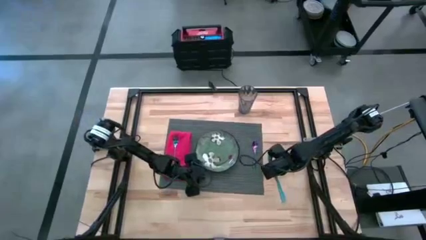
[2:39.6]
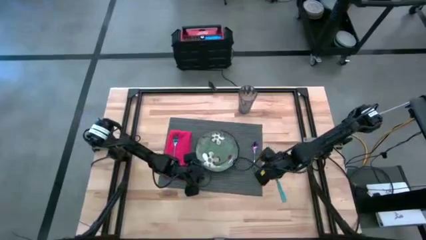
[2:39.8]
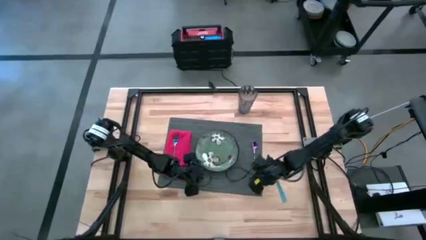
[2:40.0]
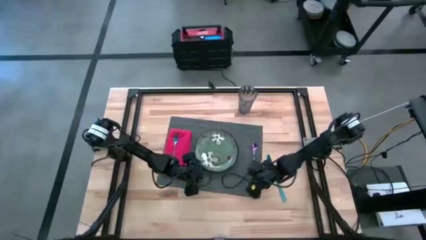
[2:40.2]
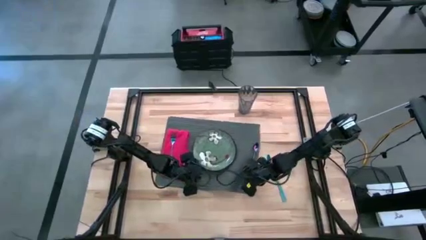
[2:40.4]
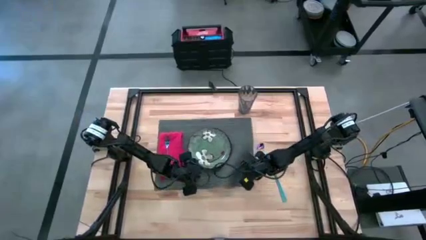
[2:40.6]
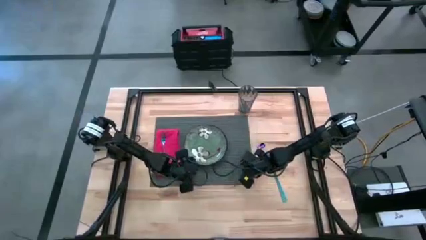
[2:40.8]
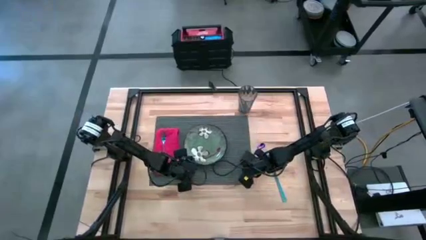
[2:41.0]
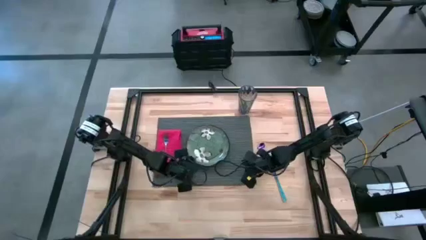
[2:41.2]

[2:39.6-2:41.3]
Task: Set table place
Adjust the gray table mat

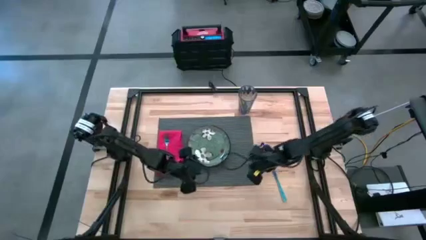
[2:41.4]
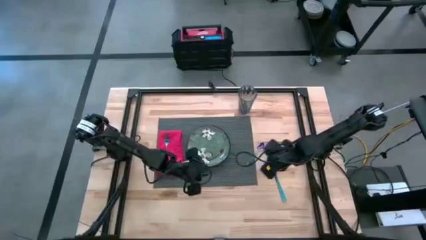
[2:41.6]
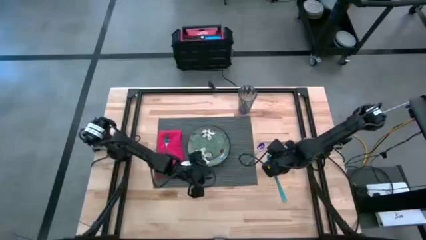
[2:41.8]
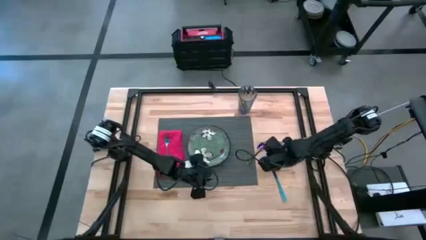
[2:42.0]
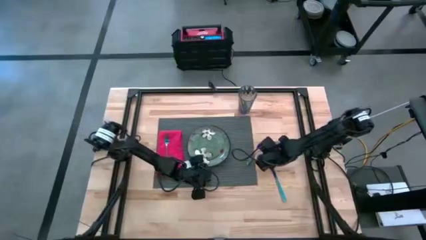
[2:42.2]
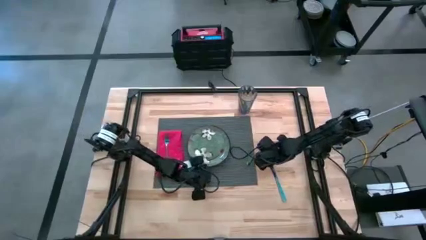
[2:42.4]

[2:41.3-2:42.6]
Adjust the blue spoon on the gray table mat

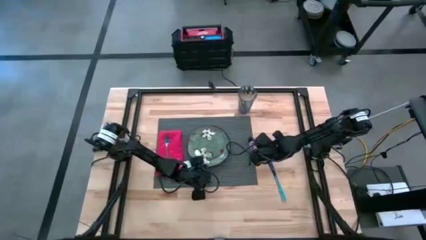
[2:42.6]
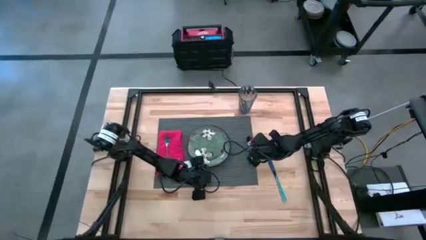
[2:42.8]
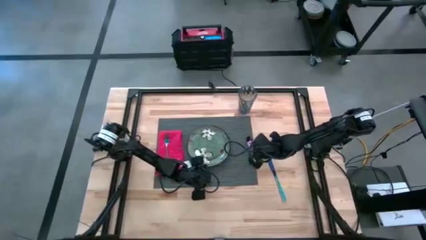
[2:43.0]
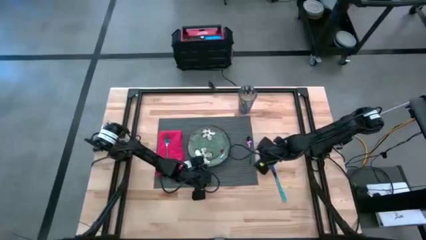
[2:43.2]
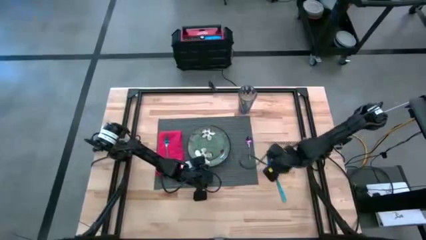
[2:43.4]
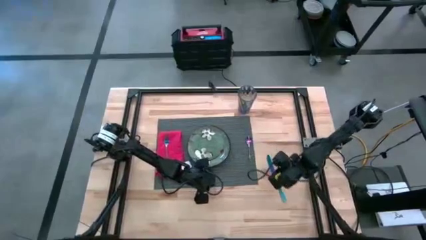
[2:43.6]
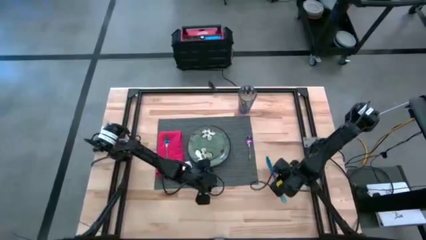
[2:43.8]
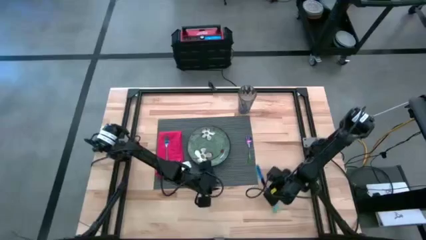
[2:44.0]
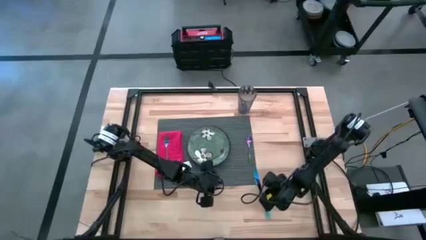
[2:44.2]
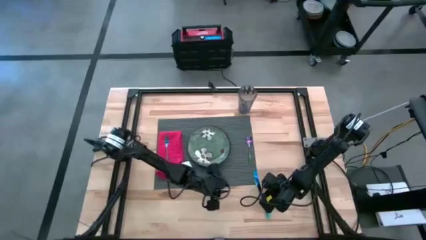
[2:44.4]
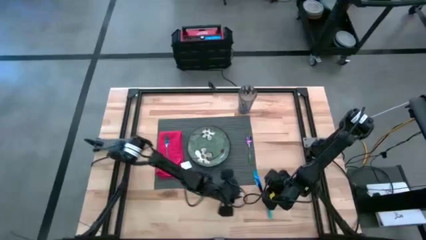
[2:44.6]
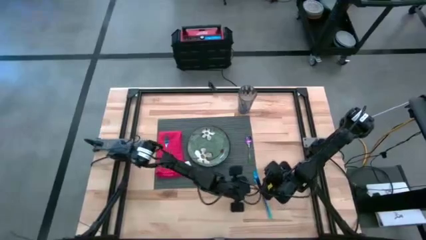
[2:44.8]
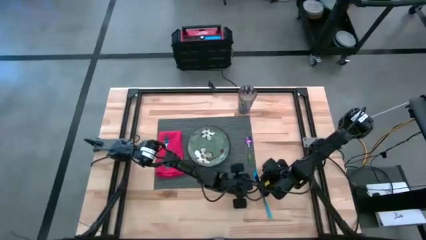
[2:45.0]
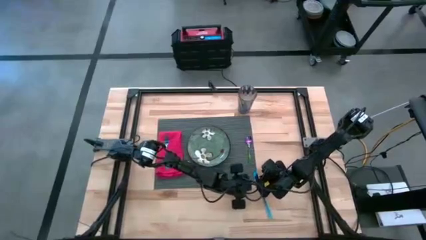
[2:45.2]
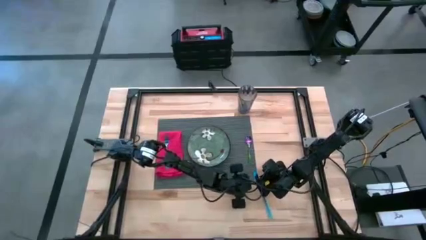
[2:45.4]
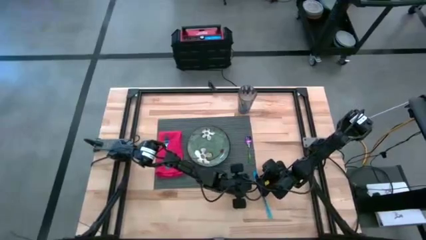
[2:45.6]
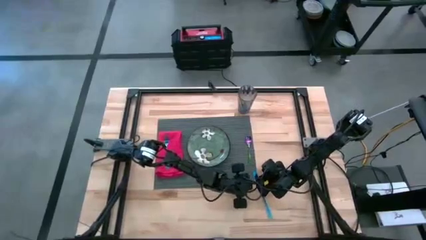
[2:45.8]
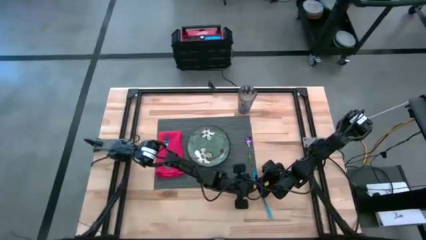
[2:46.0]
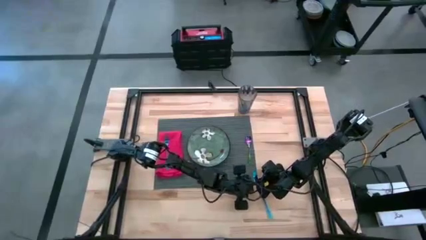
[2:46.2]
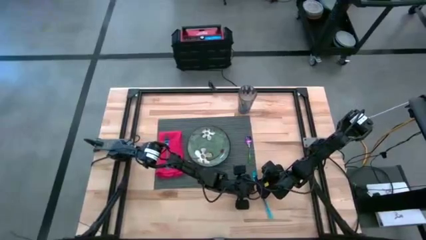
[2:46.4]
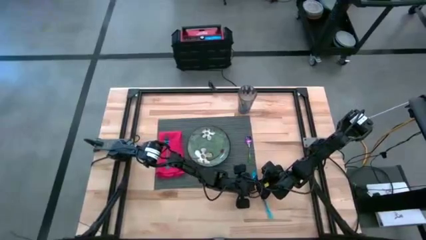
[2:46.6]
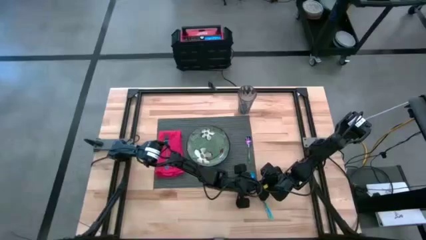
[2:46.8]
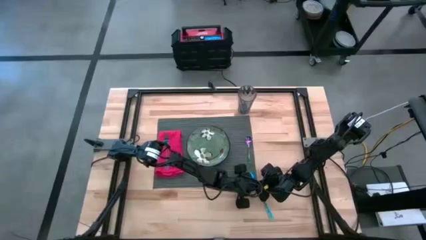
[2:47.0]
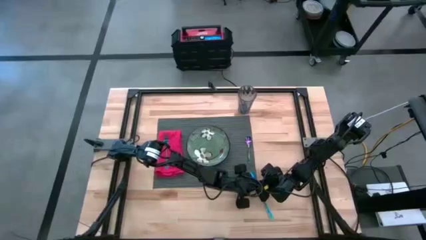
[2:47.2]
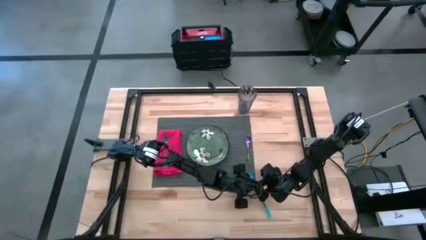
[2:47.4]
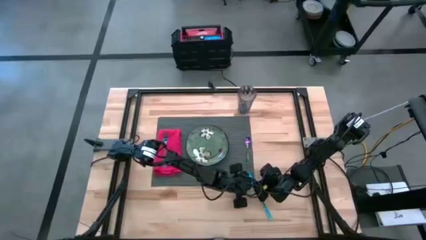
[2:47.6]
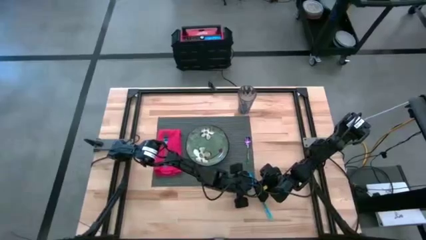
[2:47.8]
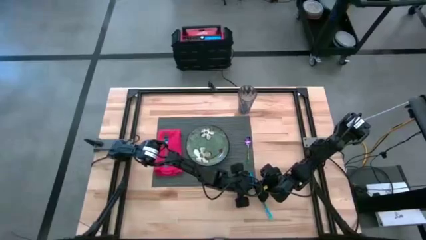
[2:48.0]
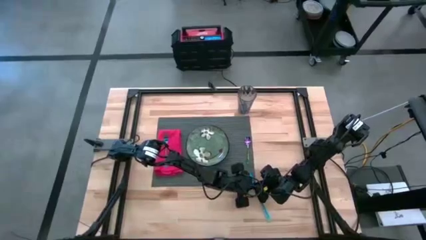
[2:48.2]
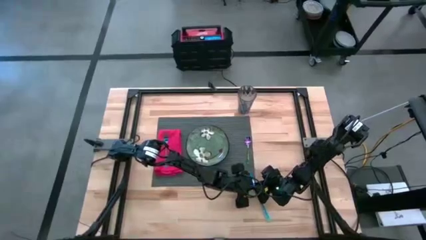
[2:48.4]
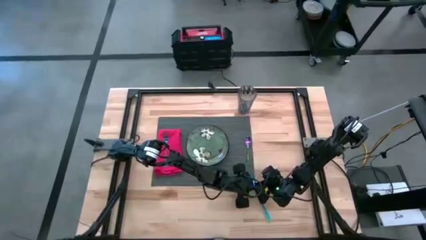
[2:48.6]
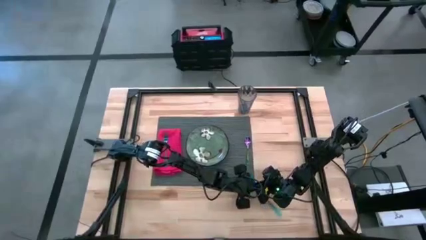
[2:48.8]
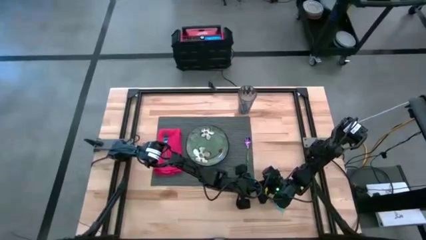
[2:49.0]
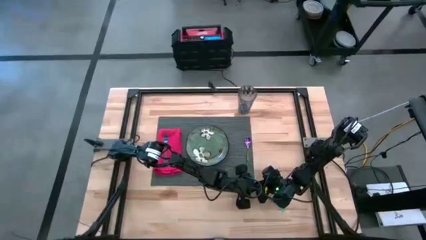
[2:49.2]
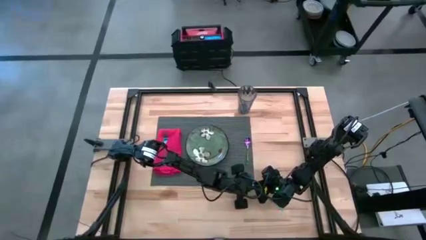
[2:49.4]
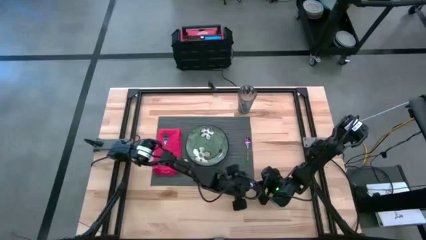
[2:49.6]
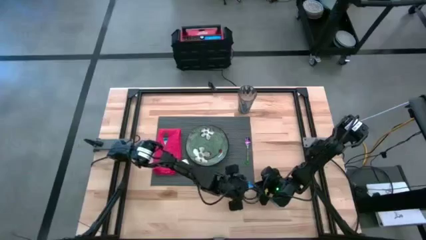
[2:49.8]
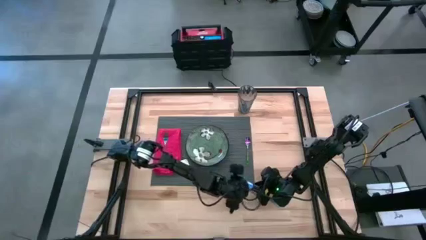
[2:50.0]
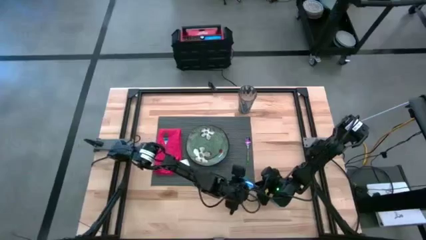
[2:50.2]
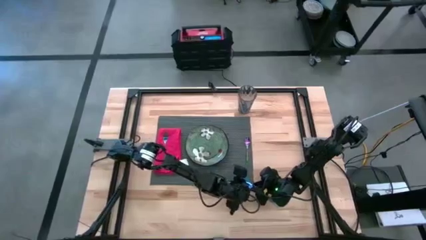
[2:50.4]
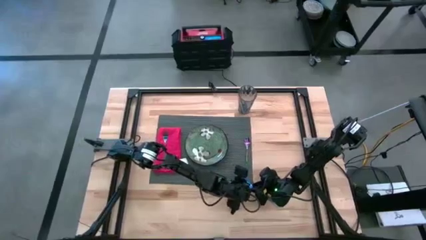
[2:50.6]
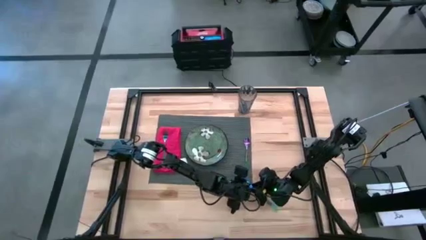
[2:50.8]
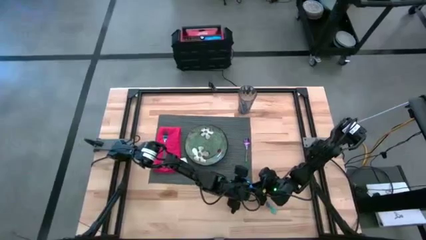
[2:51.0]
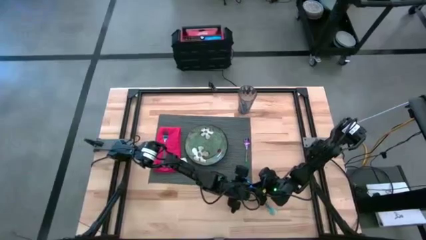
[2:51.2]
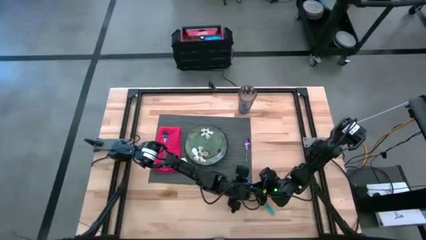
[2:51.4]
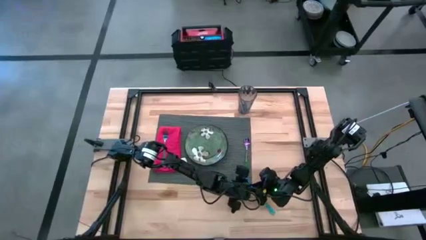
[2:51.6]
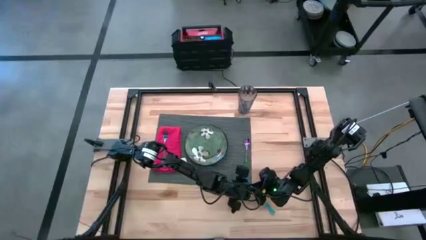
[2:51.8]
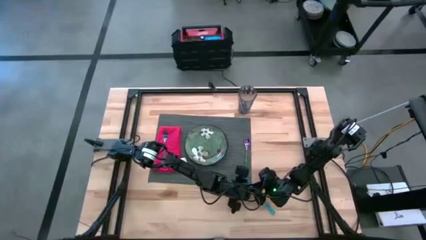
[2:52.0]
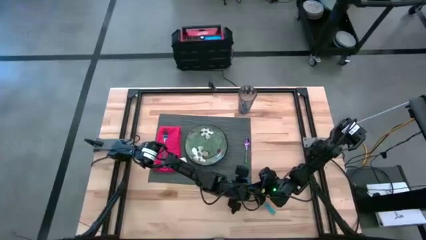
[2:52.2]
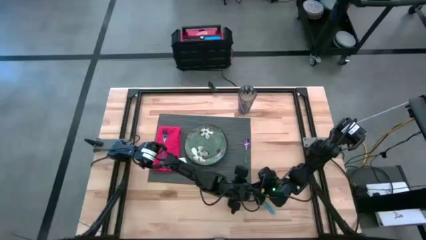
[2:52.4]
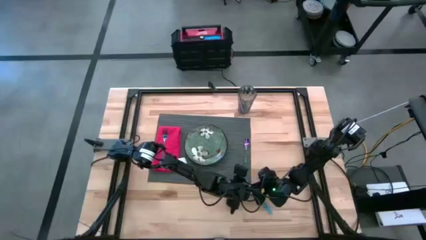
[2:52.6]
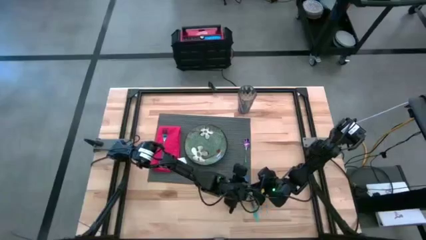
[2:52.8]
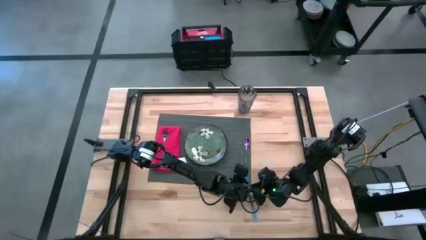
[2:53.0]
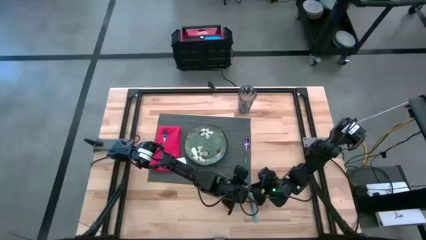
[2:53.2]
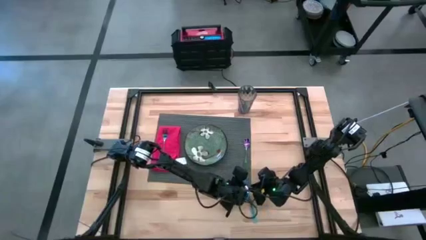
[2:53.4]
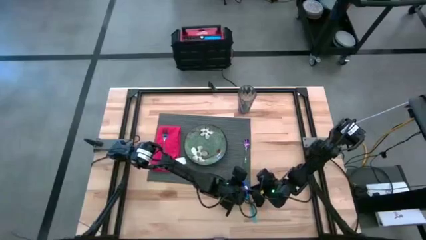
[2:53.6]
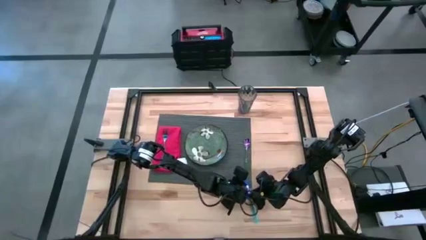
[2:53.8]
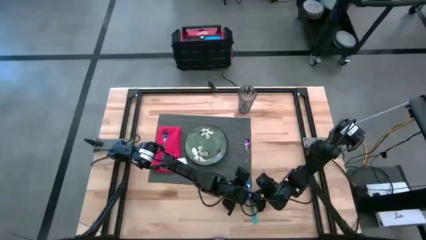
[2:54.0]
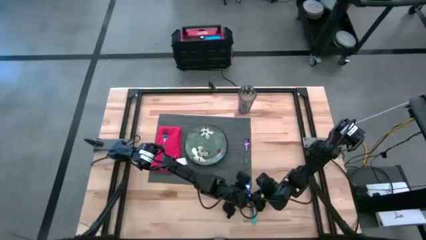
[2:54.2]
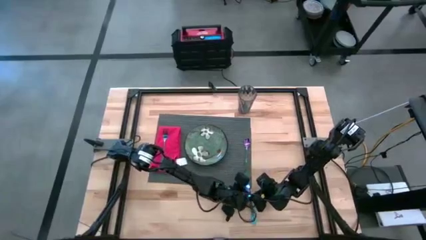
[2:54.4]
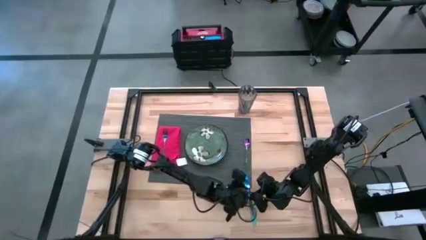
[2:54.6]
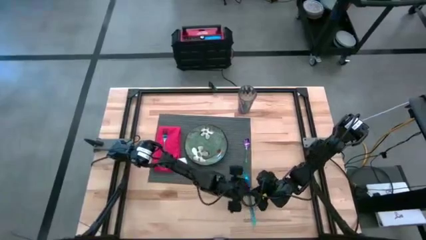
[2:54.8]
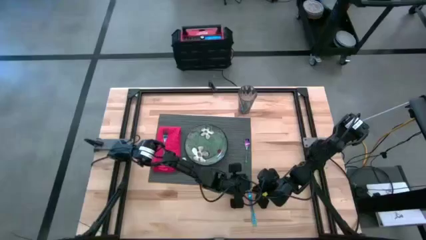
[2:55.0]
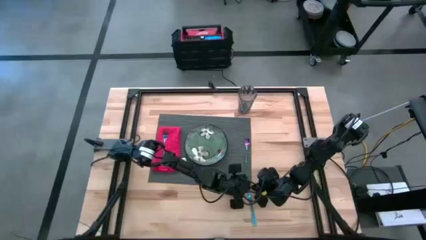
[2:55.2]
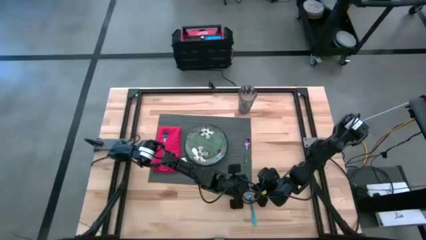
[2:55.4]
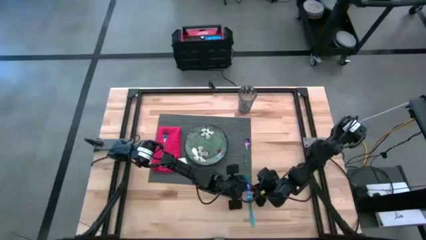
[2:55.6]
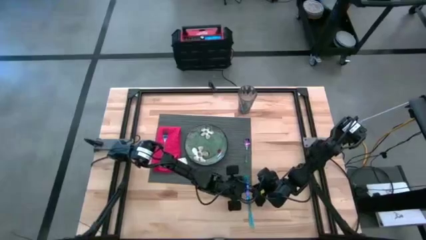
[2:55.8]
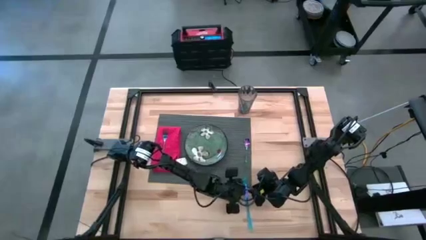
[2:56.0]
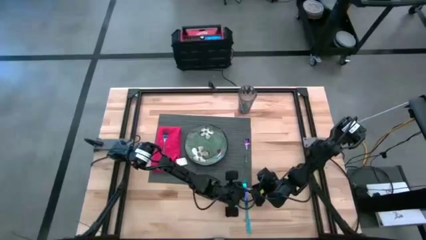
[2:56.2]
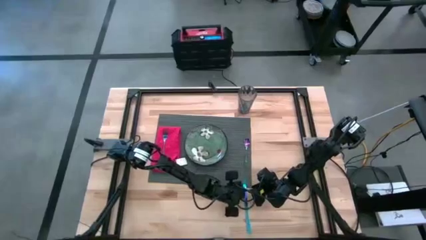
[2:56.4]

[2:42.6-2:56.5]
Put the blue table knife on the gray table mat to the left of the blue spoon
